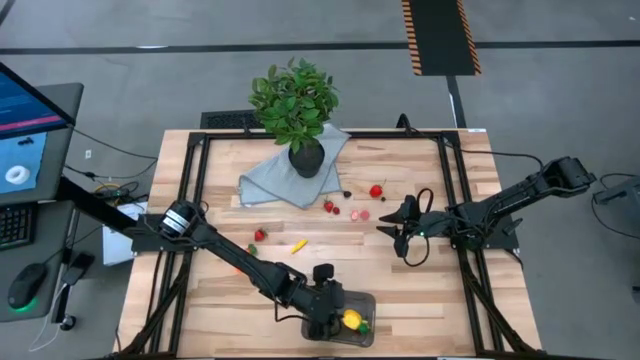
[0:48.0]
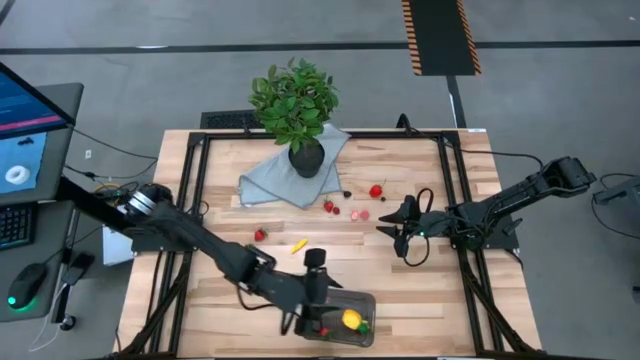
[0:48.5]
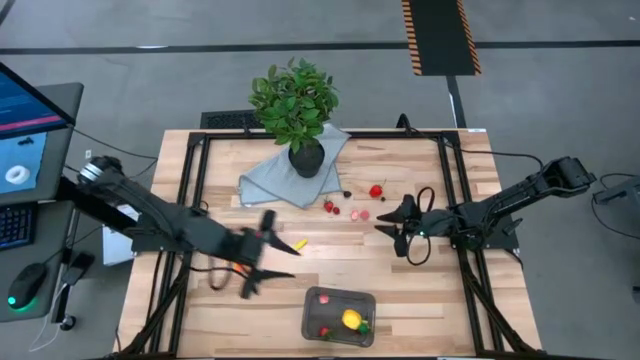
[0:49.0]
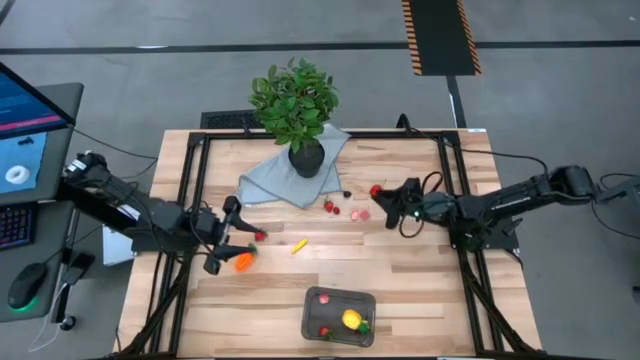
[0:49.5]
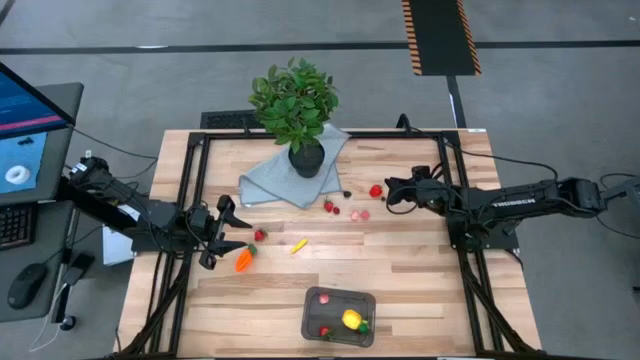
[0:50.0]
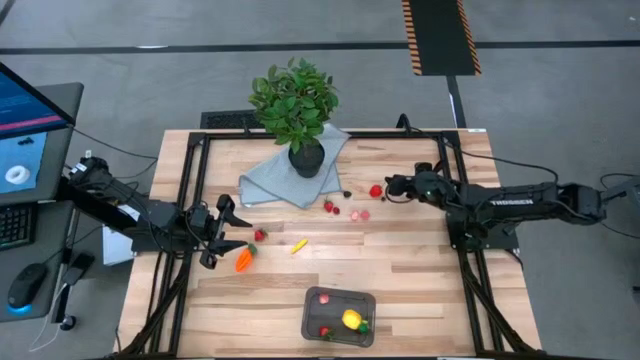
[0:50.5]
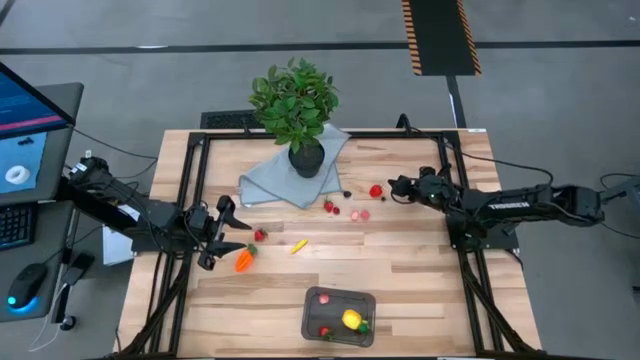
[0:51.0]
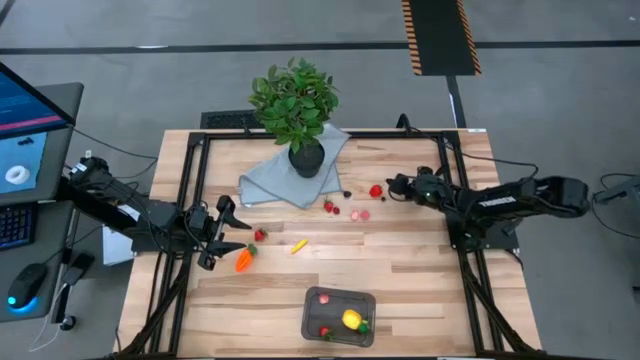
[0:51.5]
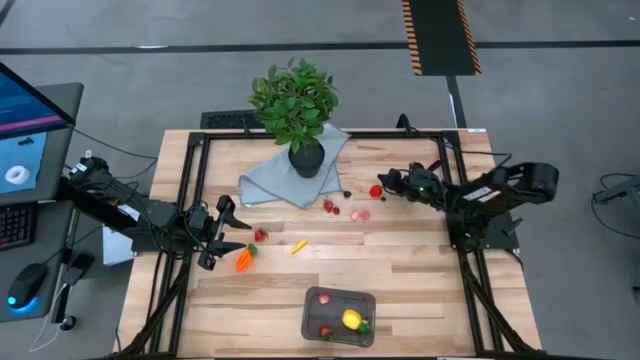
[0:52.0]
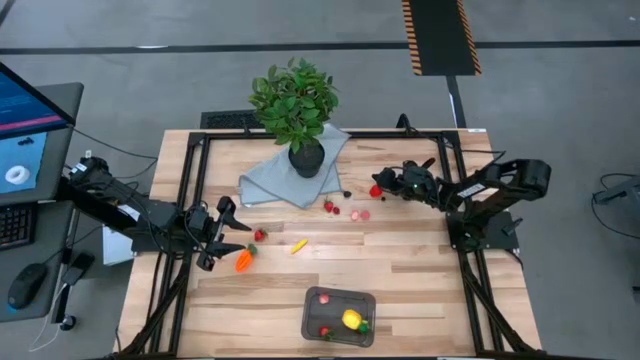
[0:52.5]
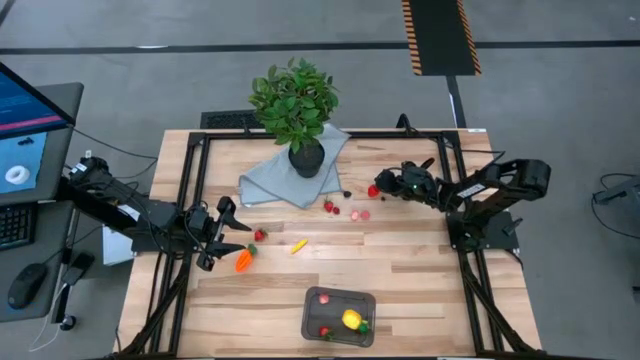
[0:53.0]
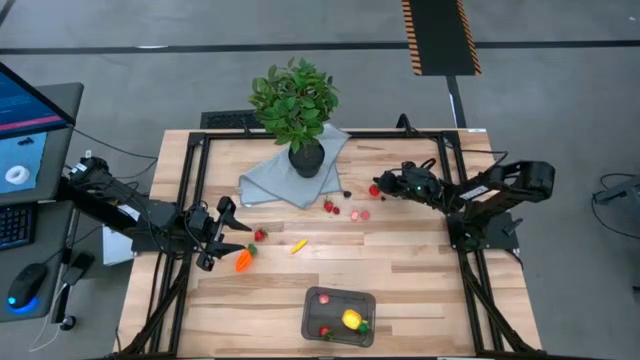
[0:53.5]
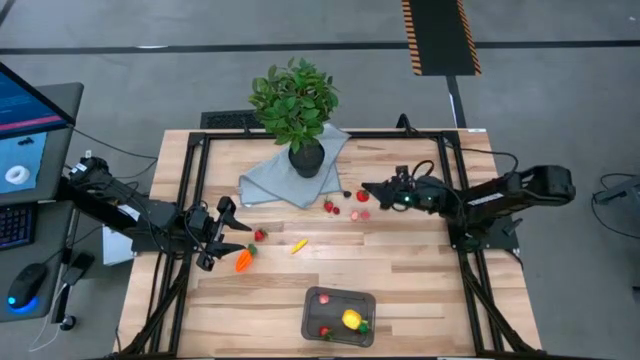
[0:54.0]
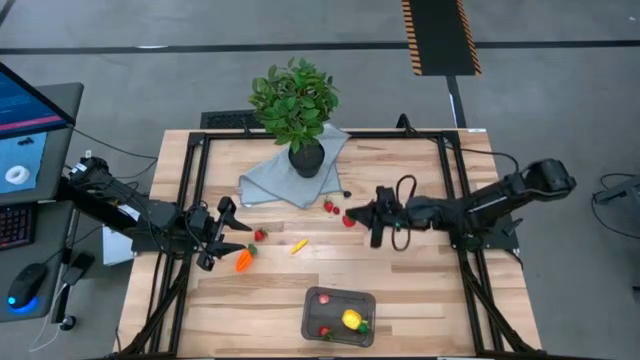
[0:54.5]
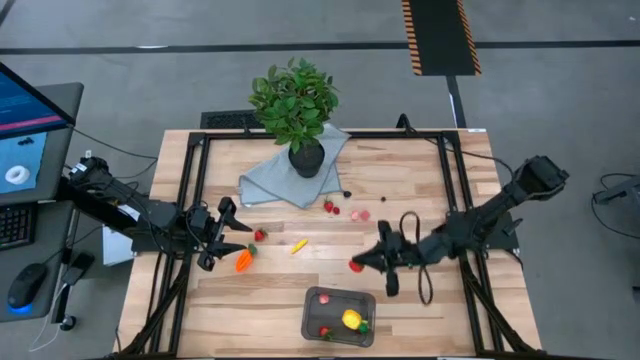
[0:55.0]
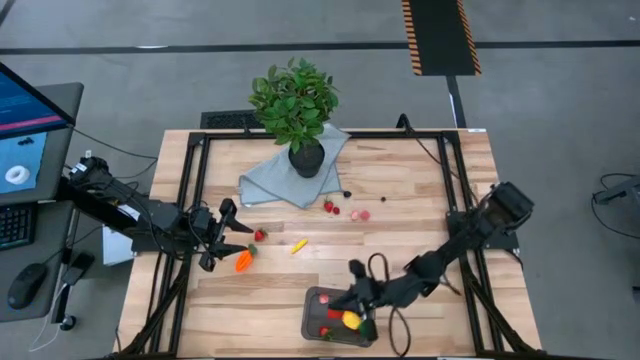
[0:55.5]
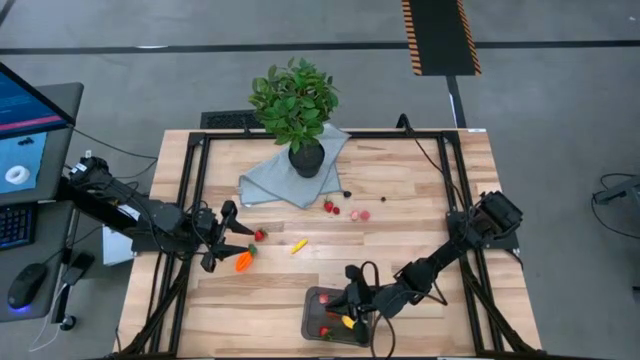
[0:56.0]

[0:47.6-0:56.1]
Task: Pick and placing Produce into tupperware
Put the red strawberry into the black bin

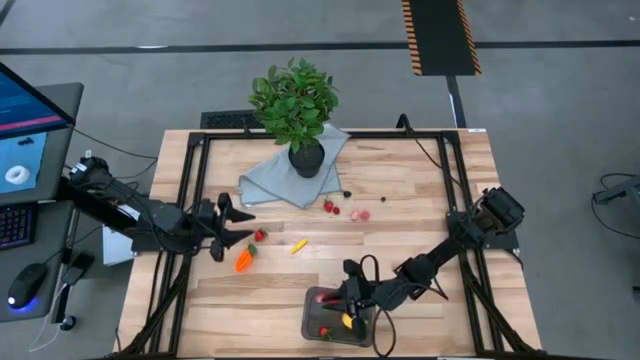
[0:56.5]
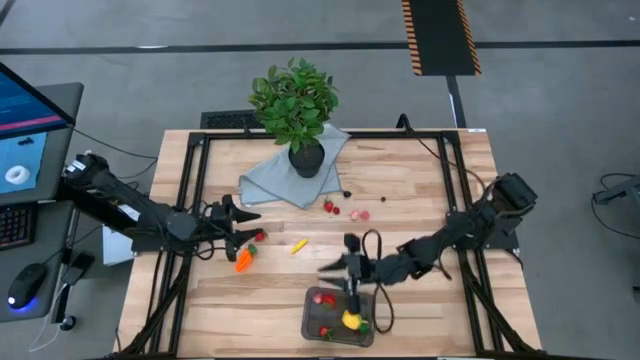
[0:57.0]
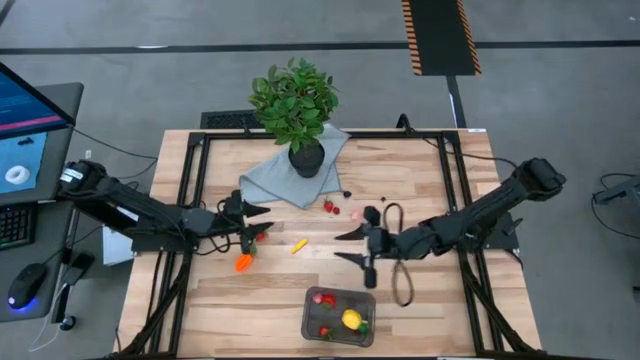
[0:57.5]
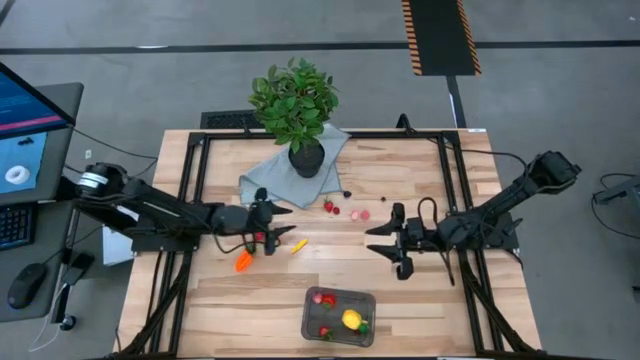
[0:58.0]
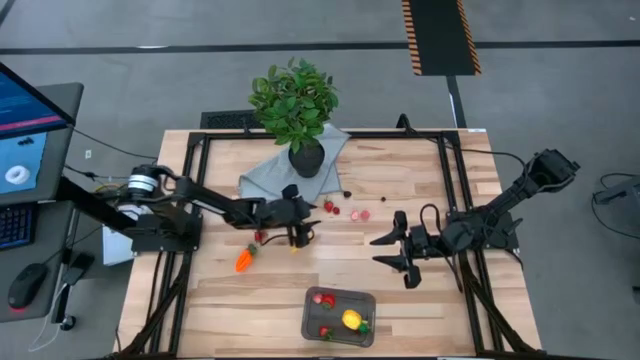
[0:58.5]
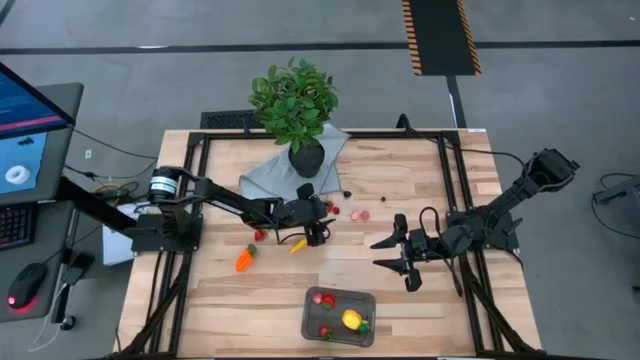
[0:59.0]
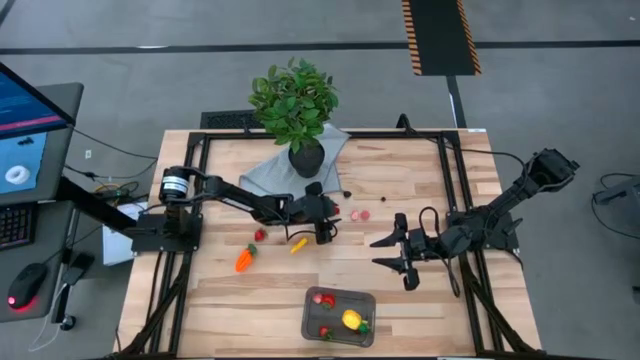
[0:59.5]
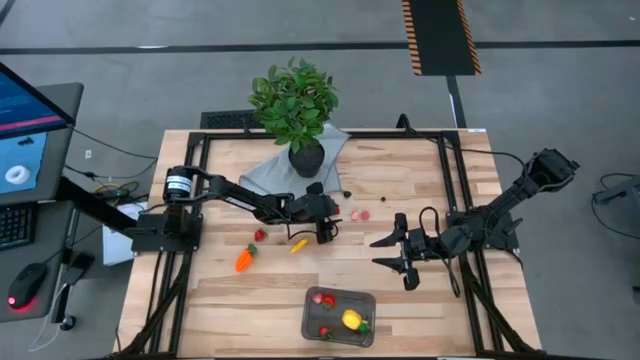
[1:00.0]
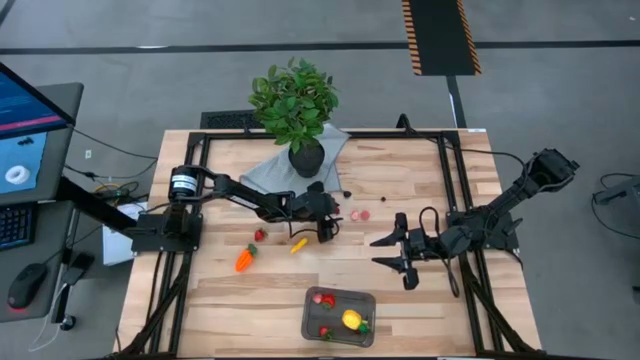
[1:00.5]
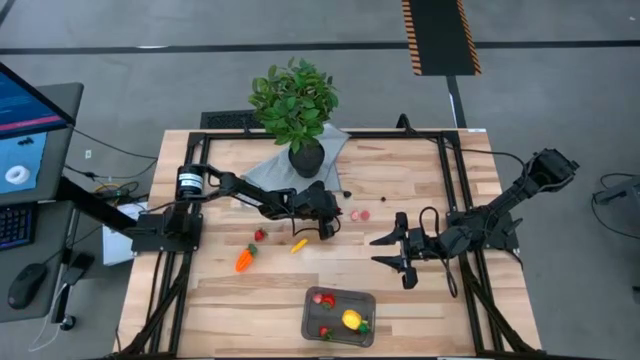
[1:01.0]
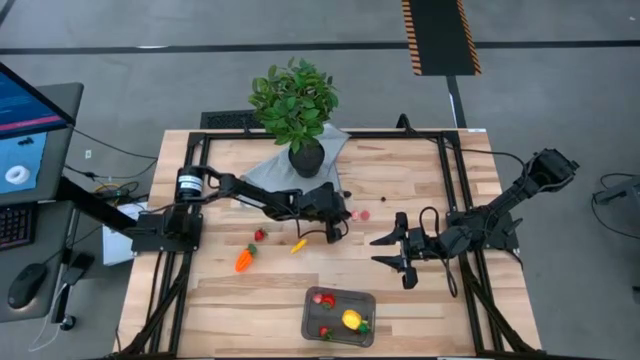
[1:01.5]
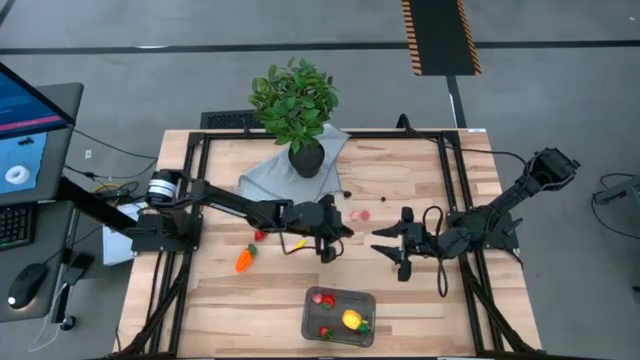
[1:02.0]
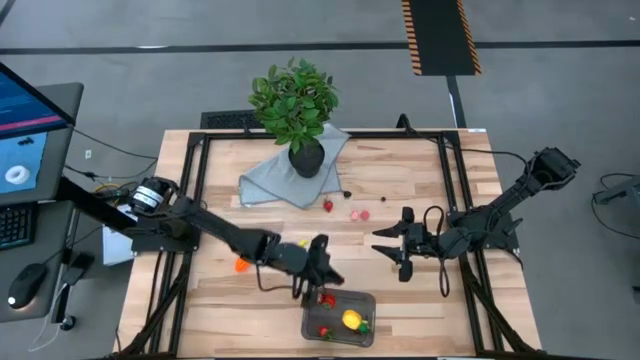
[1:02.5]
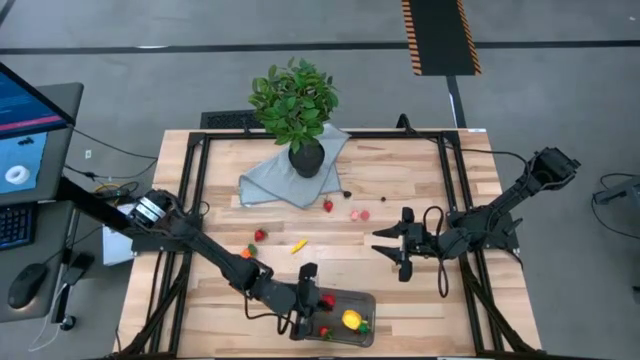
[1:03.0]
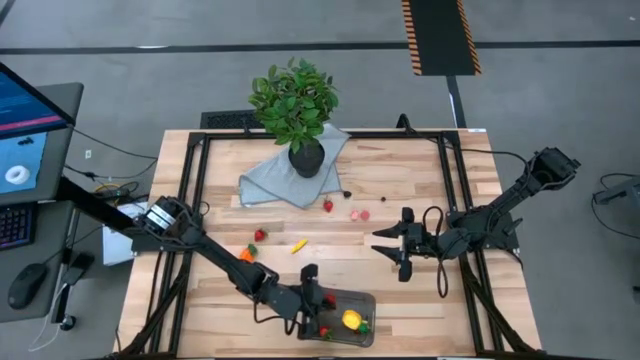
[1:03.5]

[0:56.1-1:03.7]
Put the red cherry into the black bin

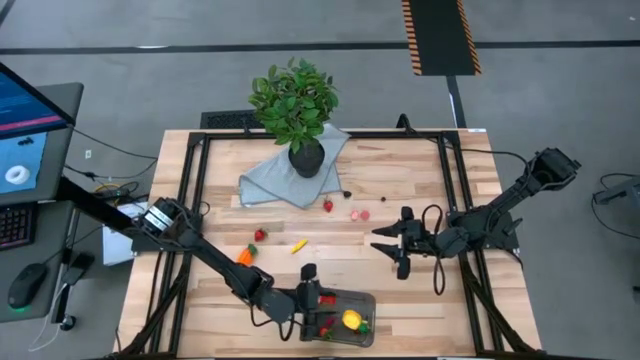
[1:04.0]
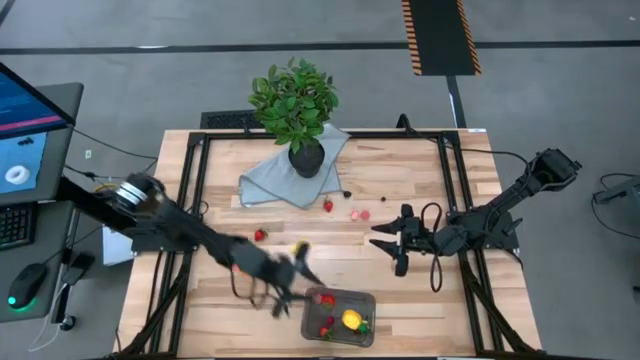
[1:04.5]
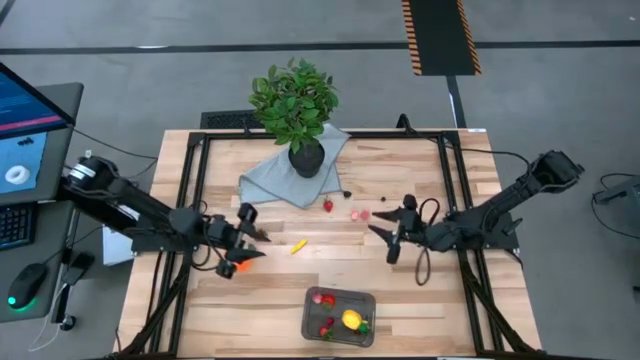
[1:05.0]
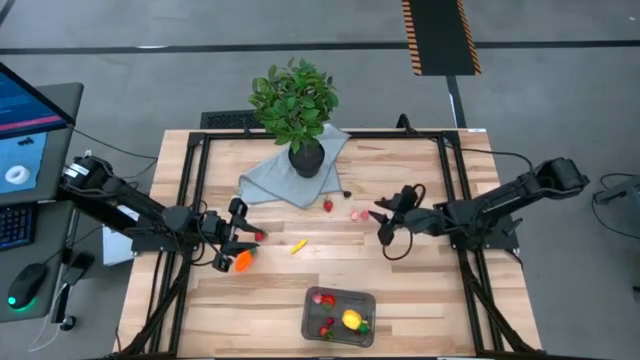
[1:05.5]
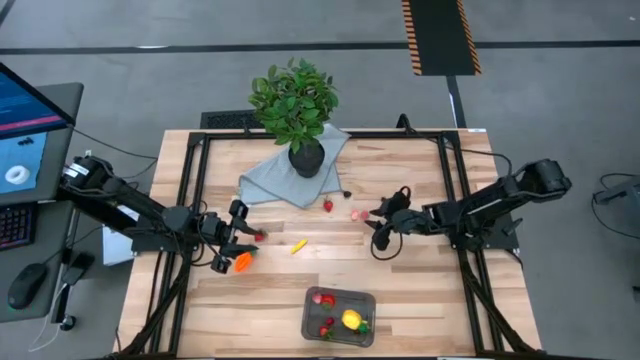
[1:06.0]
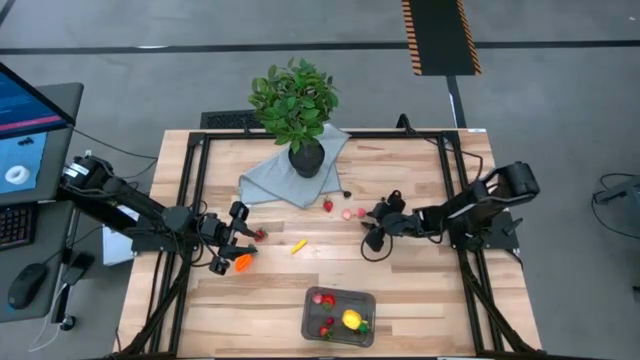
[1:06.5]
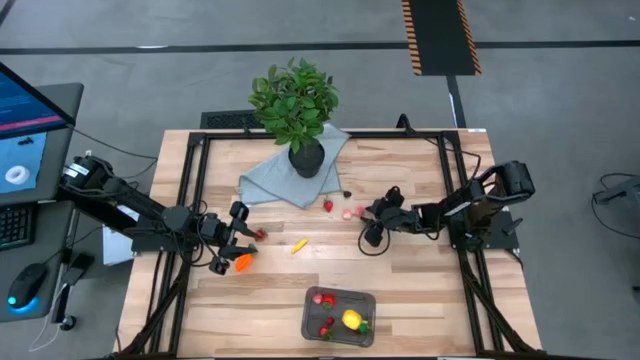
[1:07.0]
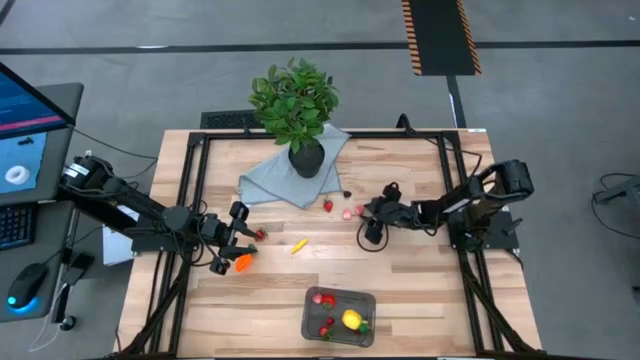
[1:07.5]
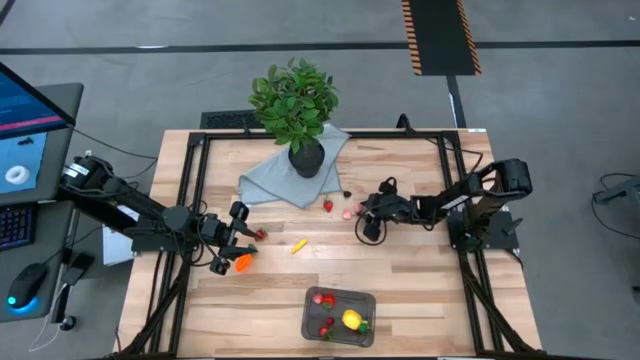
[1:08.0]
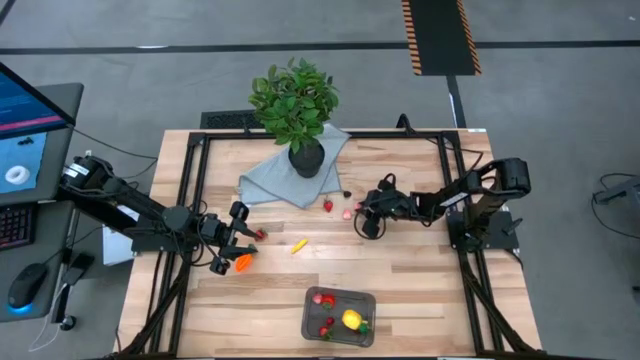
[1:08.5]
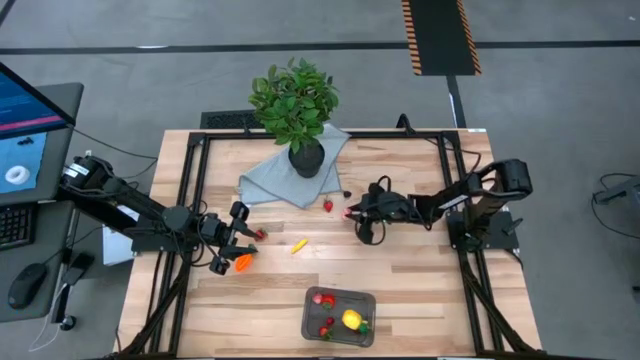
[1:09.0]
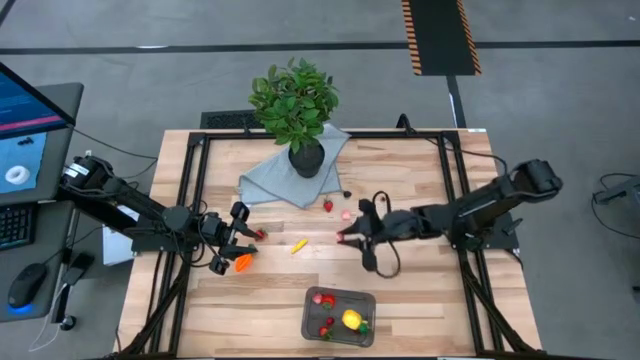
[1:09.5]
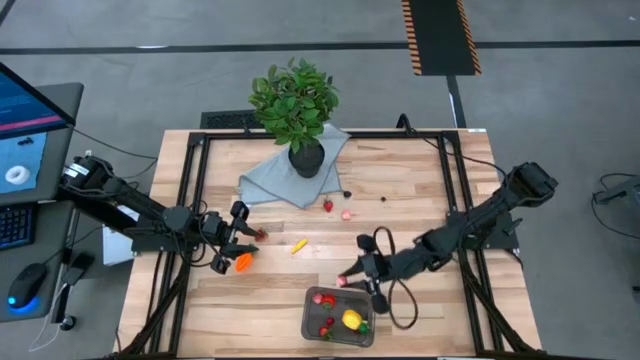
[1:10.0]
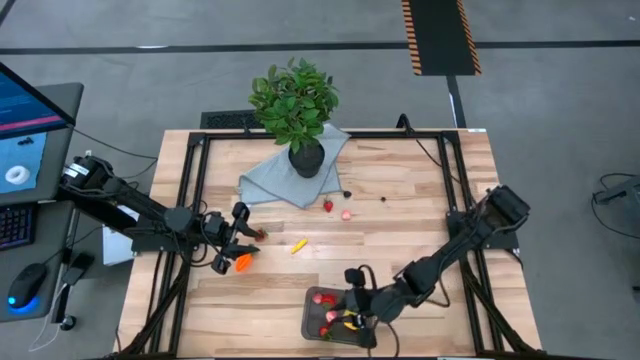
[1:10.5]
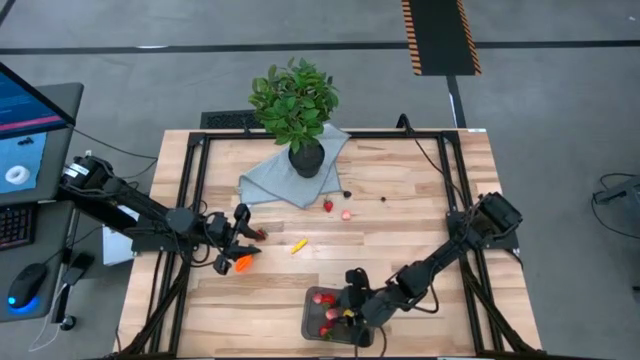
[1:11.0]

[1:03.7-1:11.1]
Put the pink peach into the black bin
